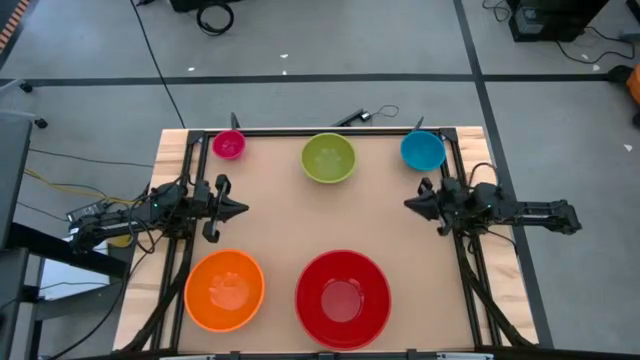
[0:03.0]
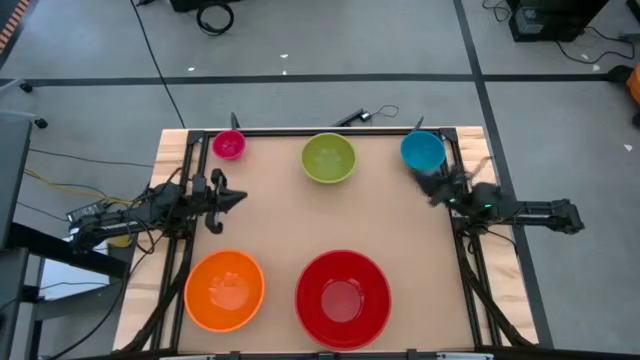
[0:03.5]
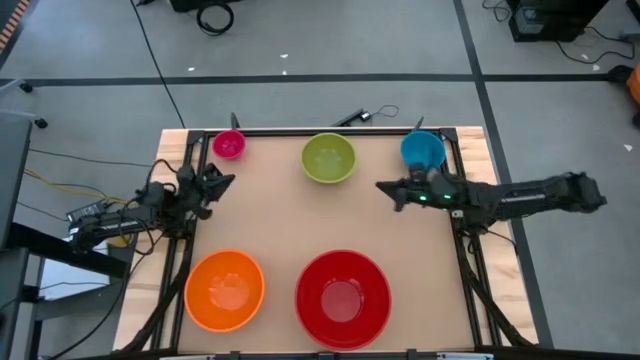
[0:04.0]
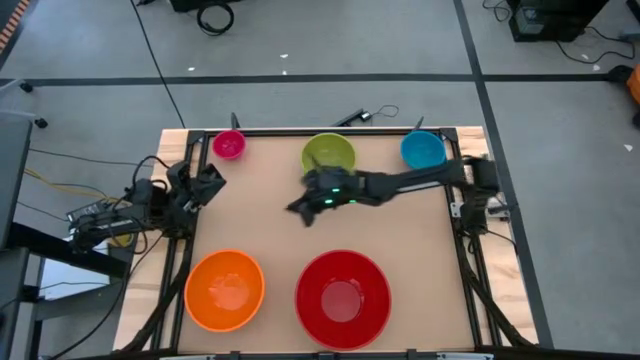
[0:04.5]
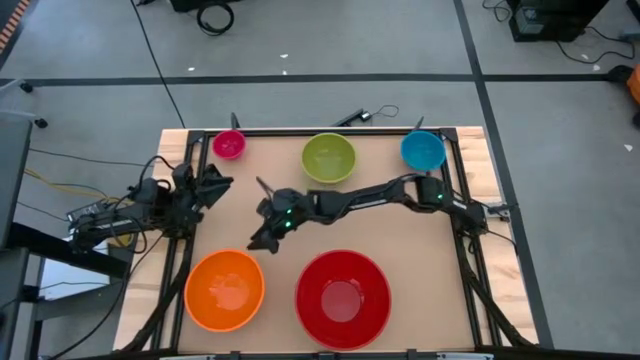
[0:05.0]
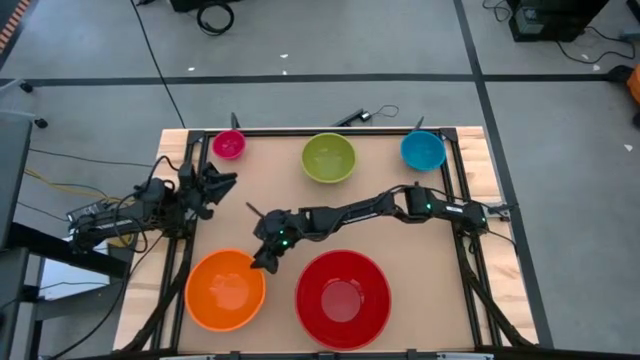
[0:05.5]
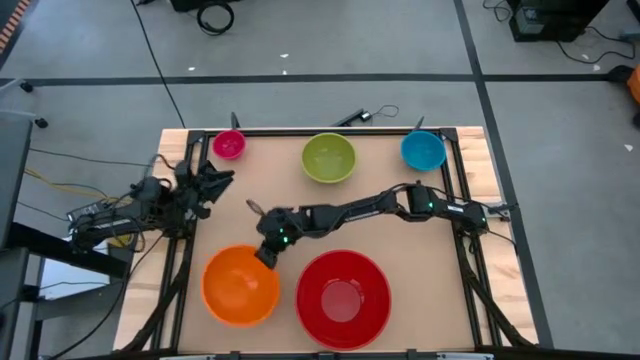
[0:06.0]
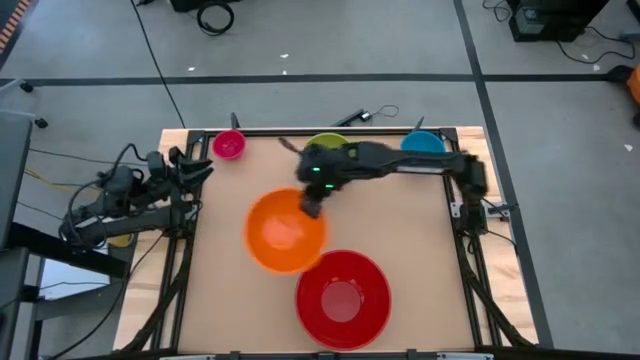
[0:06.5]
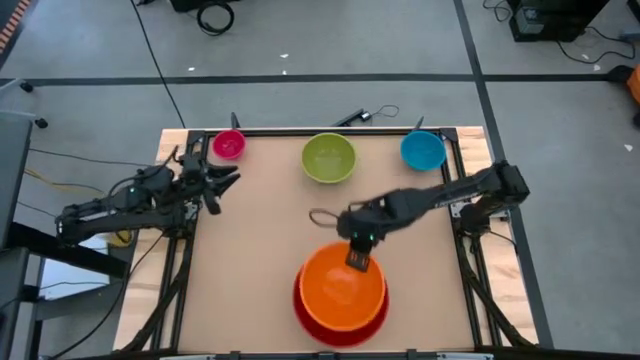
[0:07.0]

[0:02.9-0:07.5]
Stack the orange bowl on top of the red bowl

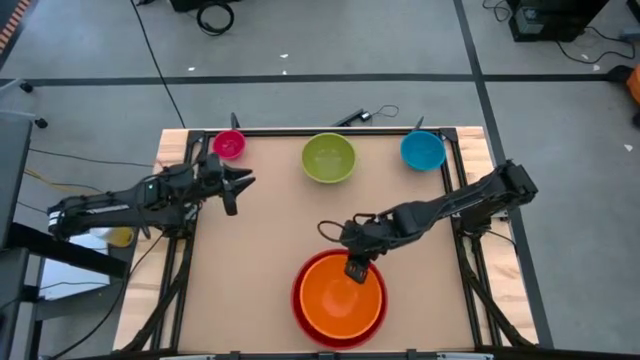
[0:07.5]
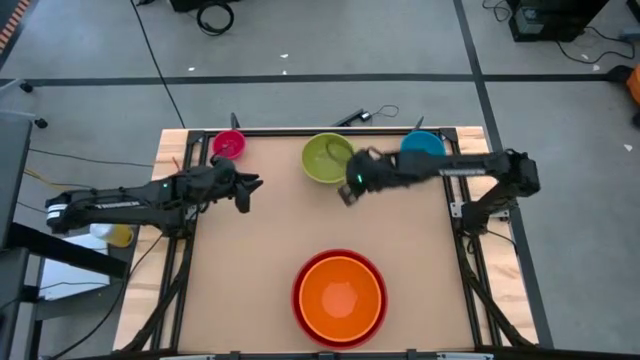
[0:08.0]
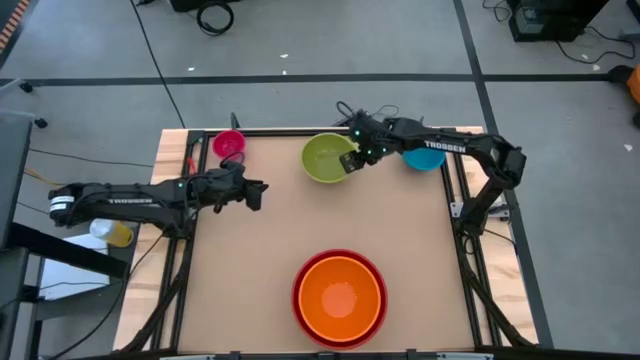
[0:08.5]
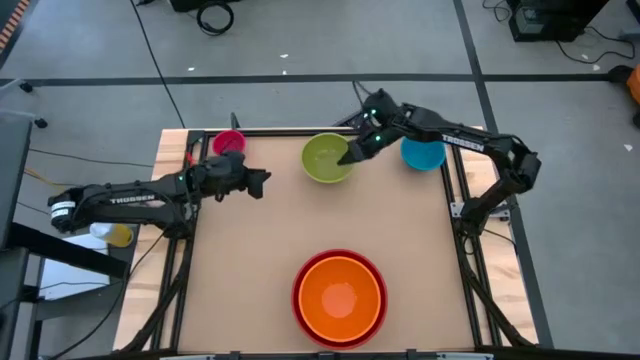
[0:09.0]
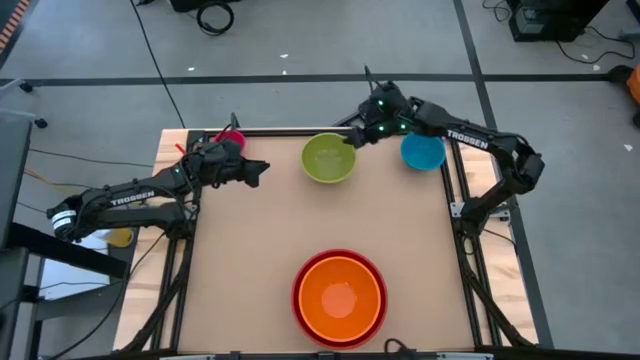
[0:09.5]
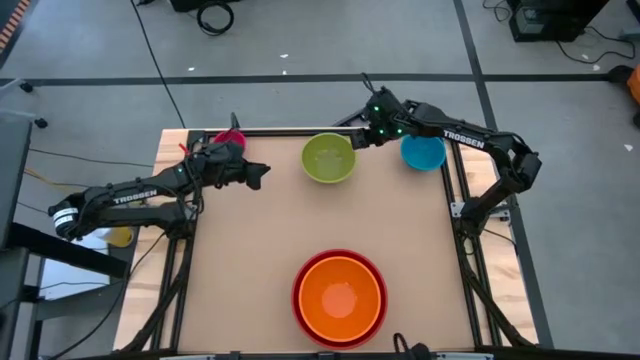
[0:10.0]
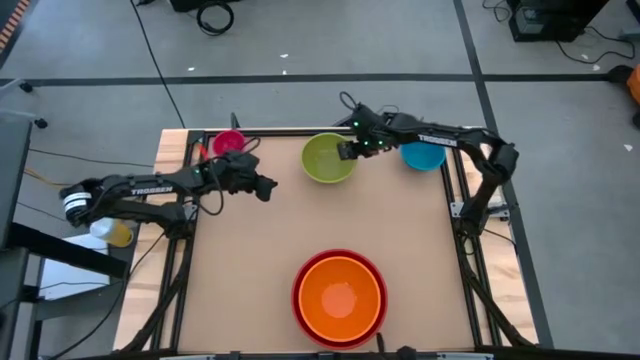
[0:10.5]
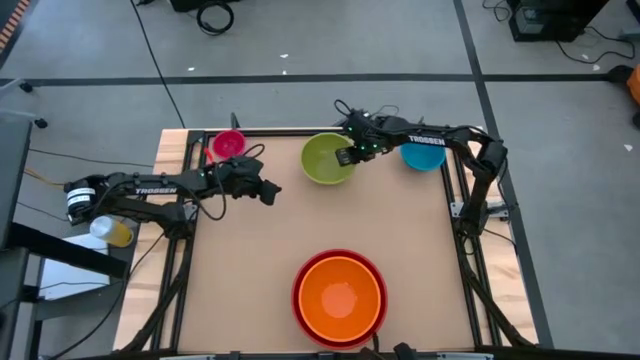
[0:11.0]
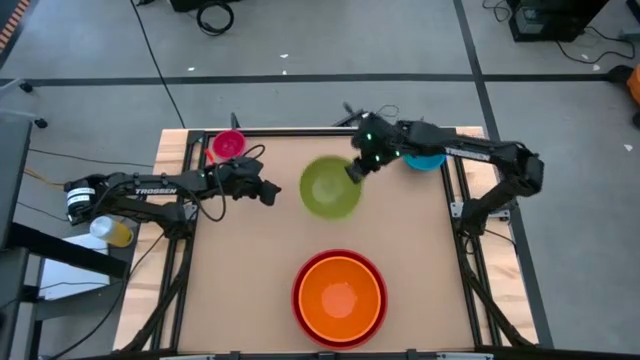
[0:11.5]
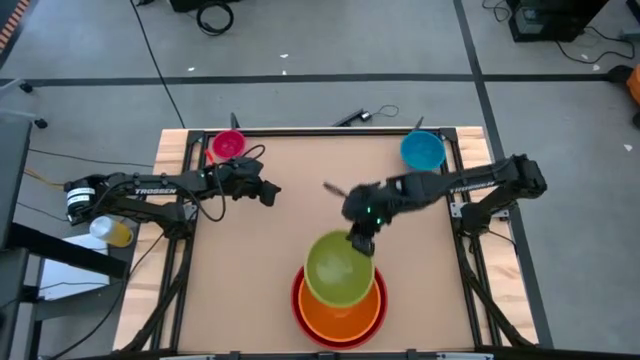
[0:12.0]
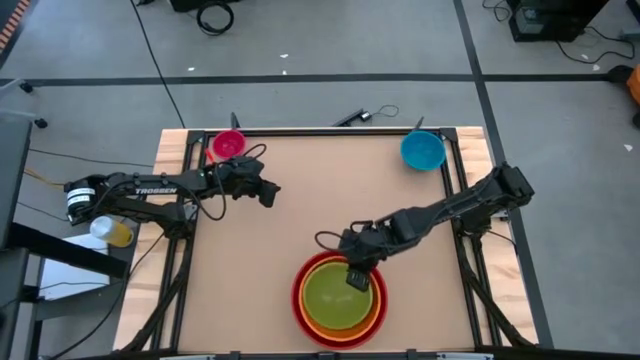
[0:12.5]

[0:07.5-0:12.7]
Stack the green bowl on top of the orange bowl

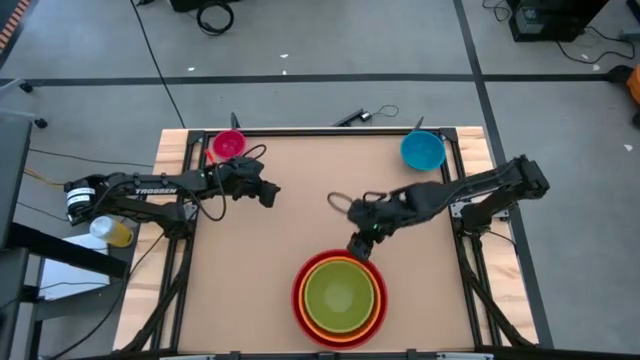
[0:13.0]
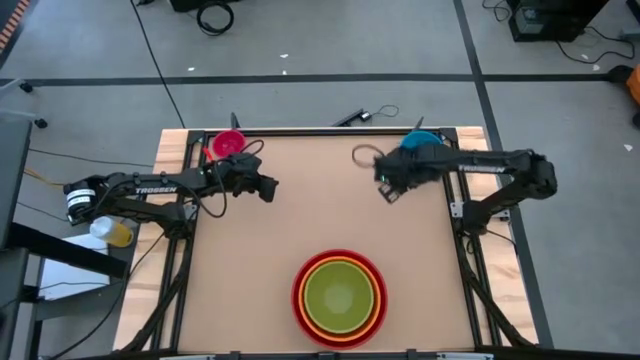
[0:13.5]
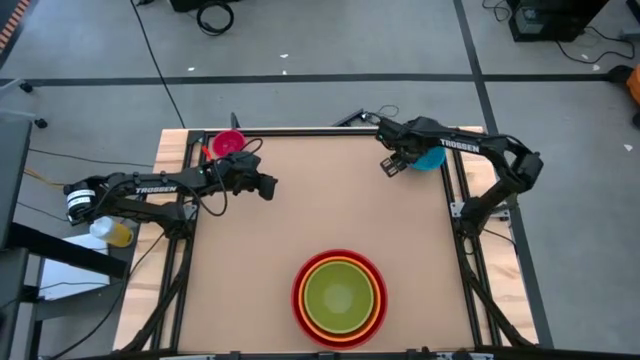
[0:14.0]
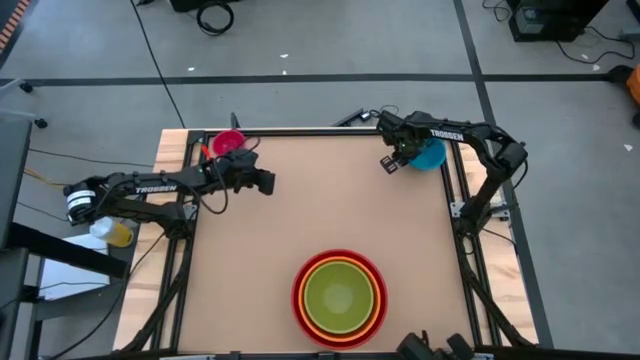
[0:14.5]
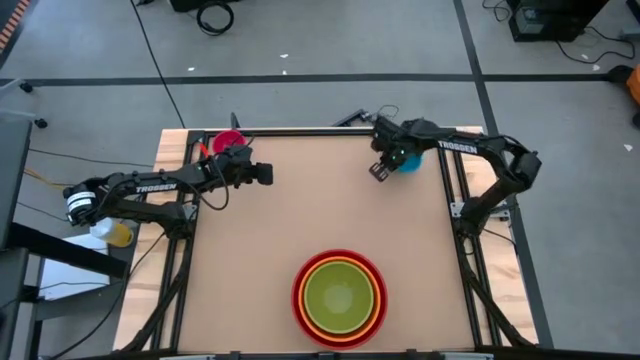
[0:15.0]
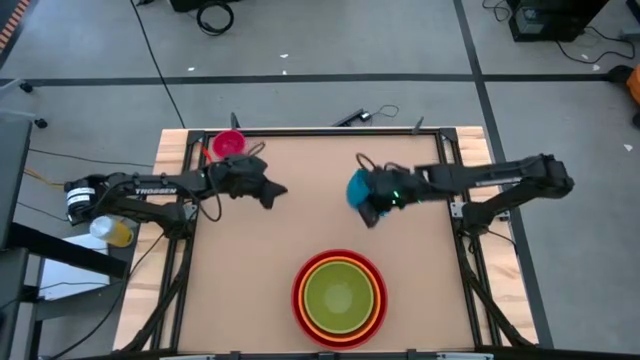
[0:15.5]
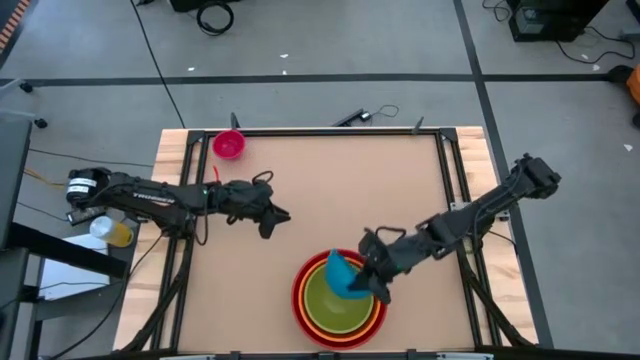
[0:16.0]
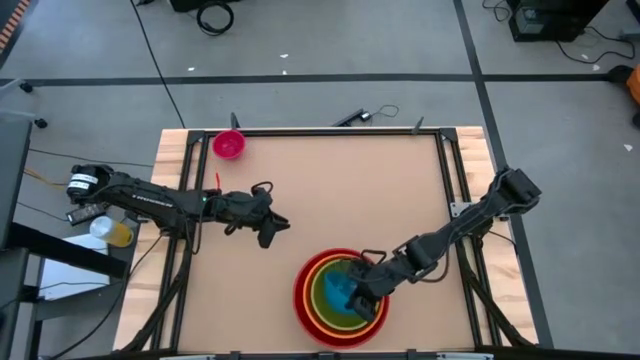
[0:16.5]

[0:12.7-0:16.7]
Stack the blue bowl on top of the green bowl

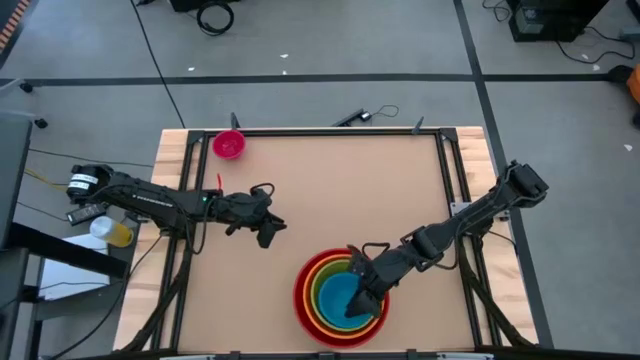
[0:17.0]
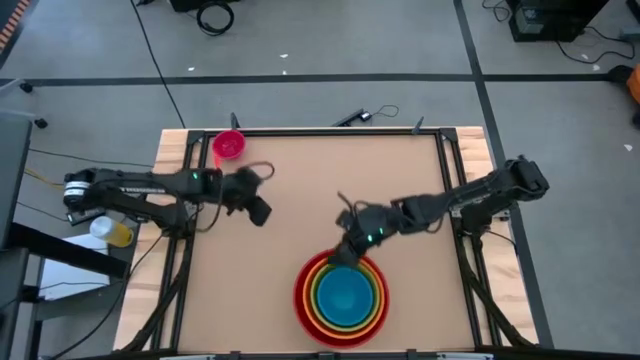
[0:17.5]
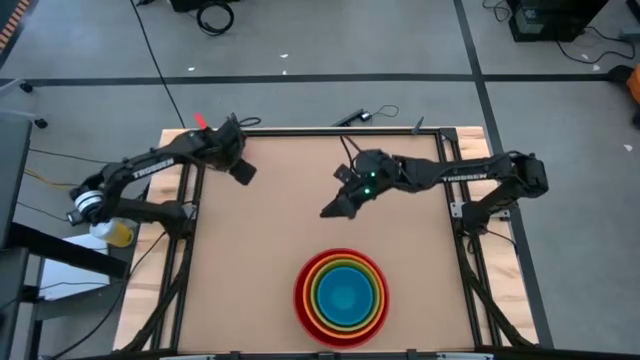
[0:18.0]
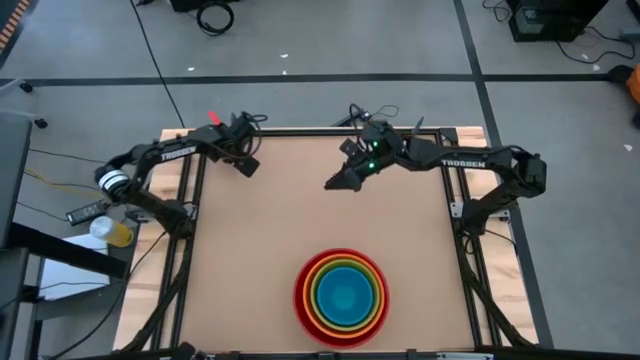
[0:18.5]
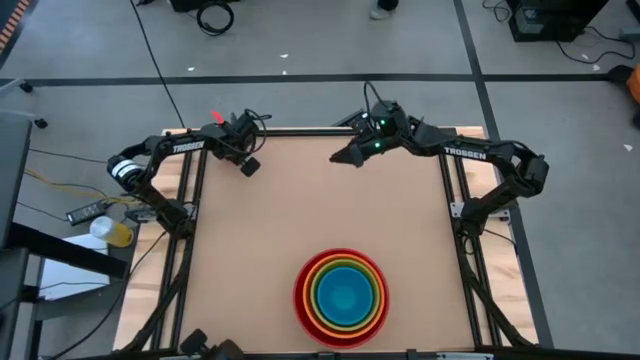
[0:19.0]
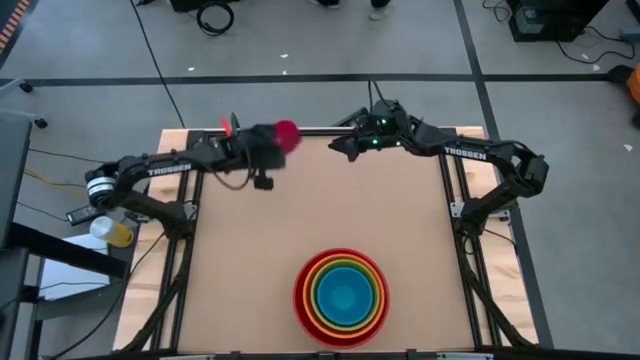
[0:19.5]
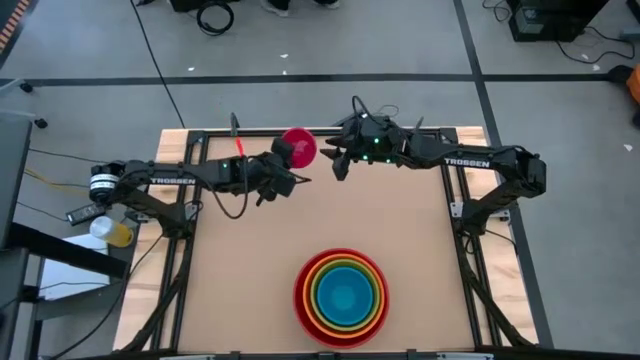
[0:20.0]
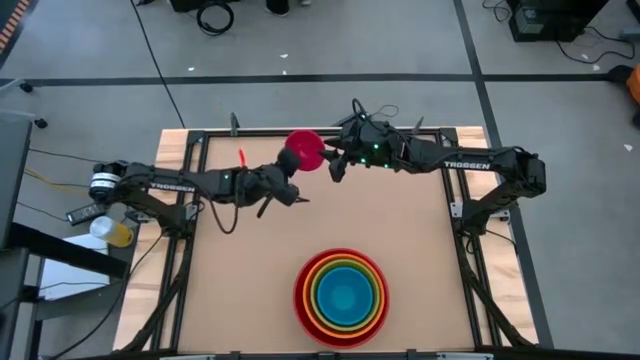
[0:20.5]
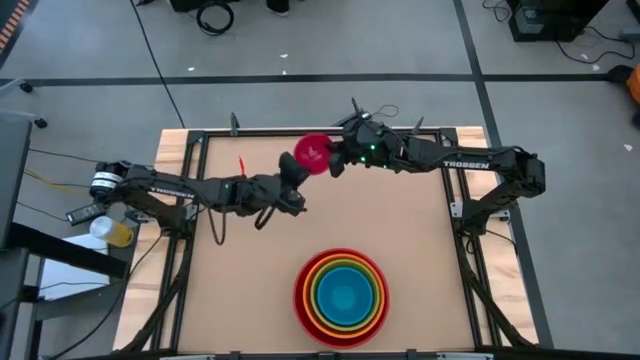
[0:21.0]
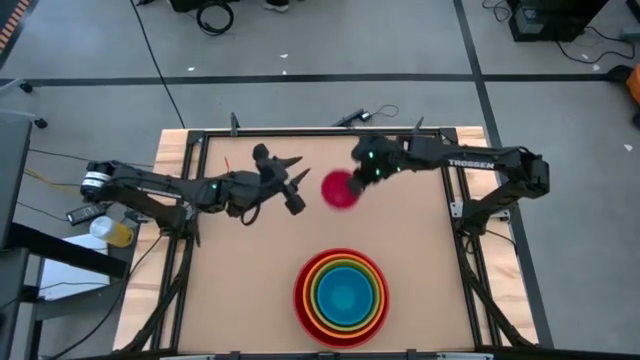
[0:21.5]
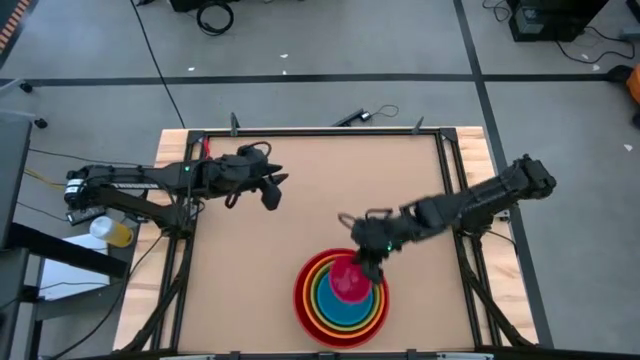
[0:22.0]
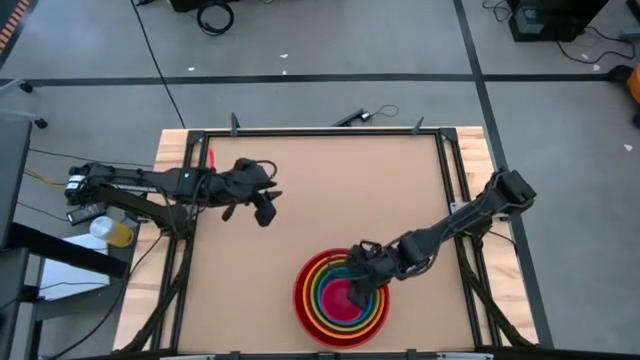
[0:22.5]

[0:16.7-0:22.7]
Stack the pink bowl on top of the top of blue bowl
